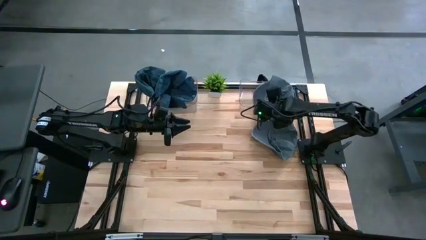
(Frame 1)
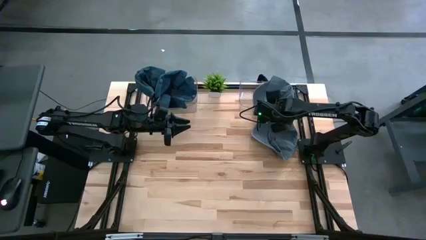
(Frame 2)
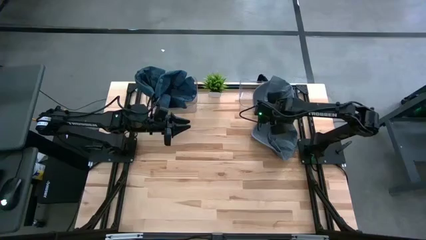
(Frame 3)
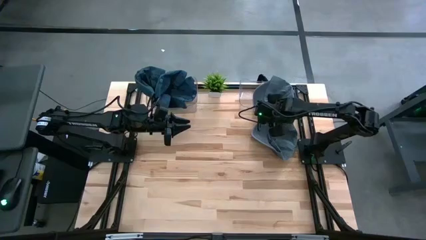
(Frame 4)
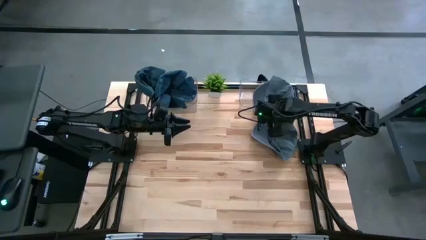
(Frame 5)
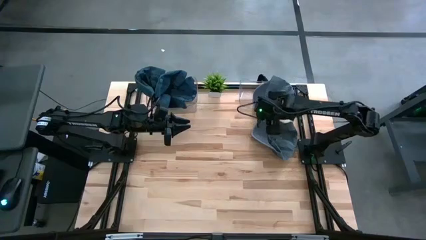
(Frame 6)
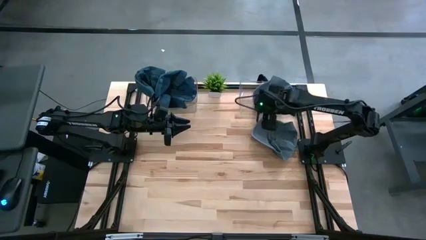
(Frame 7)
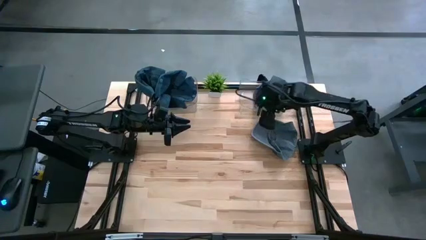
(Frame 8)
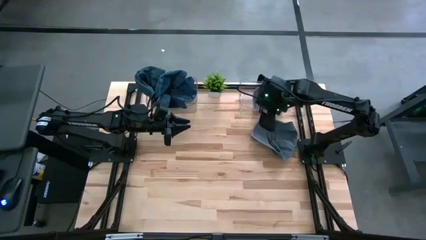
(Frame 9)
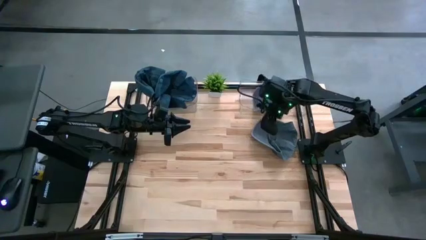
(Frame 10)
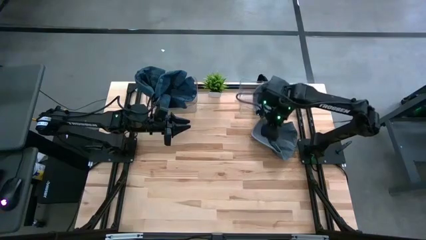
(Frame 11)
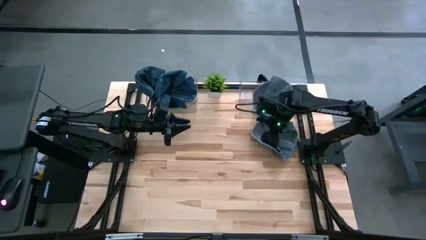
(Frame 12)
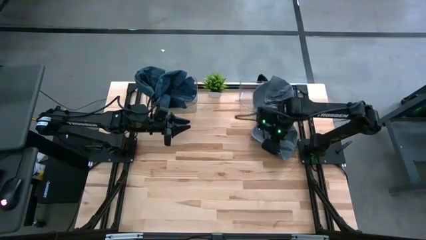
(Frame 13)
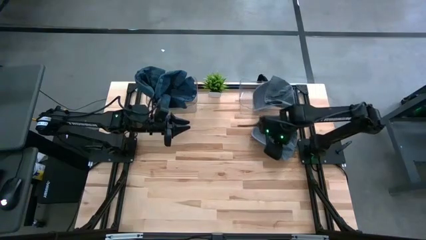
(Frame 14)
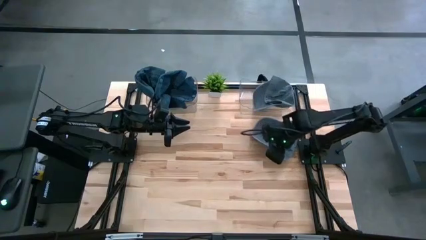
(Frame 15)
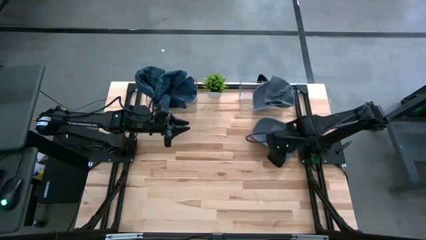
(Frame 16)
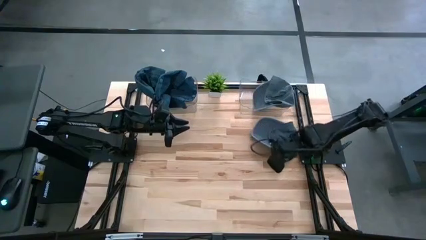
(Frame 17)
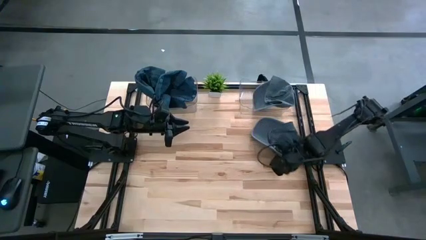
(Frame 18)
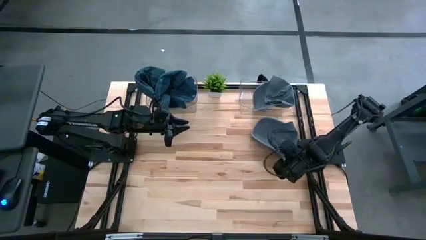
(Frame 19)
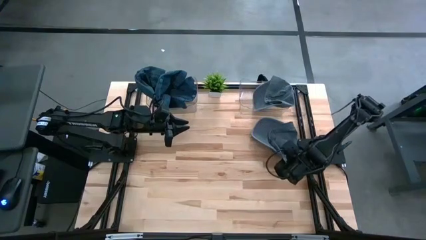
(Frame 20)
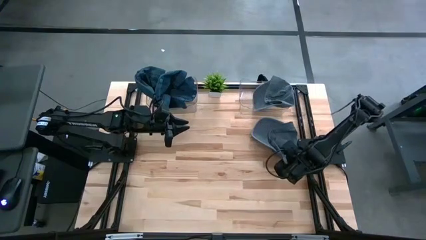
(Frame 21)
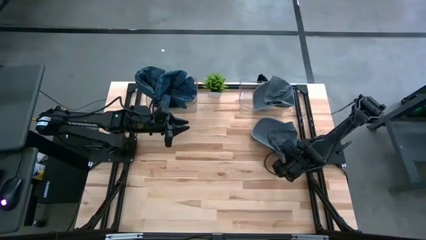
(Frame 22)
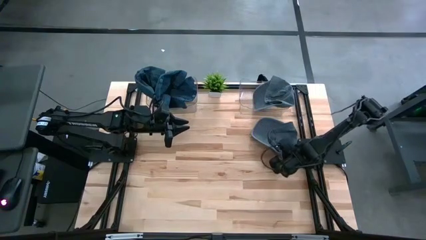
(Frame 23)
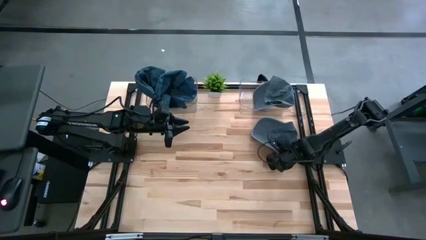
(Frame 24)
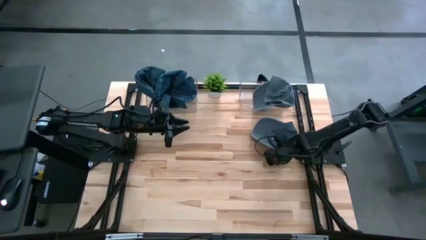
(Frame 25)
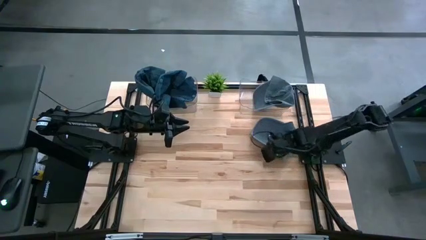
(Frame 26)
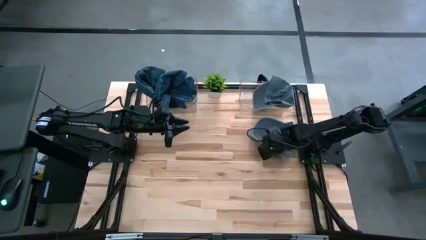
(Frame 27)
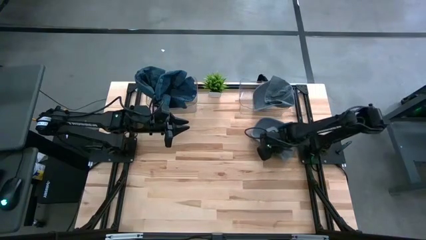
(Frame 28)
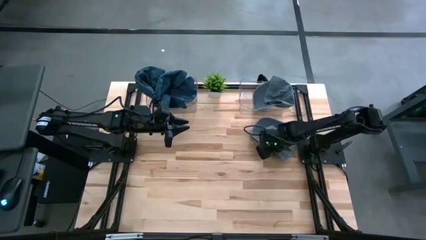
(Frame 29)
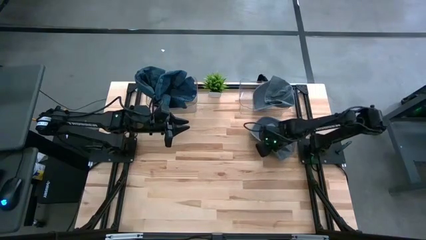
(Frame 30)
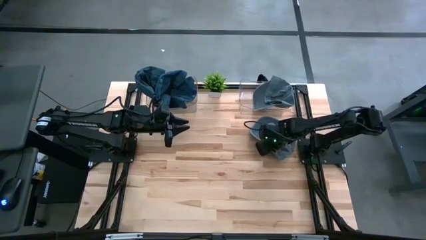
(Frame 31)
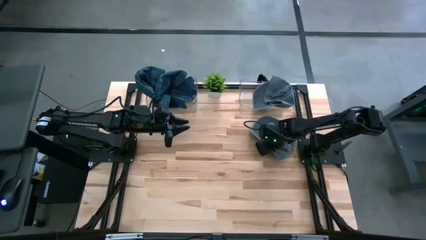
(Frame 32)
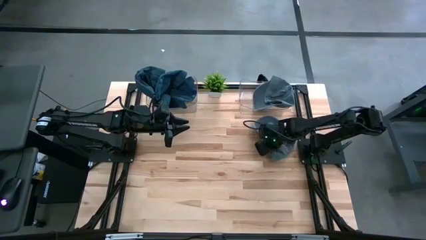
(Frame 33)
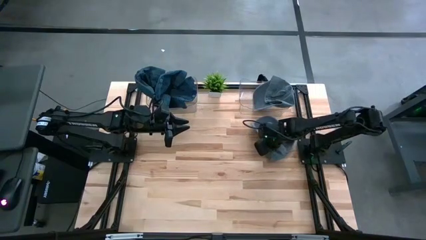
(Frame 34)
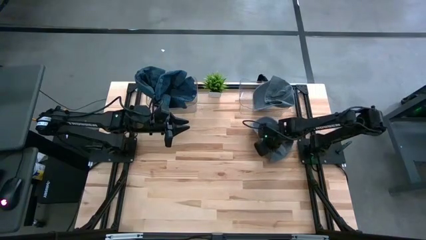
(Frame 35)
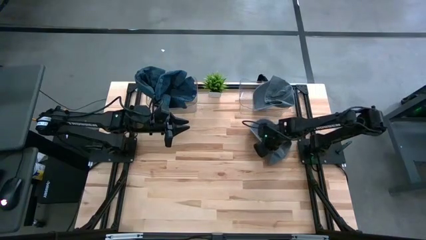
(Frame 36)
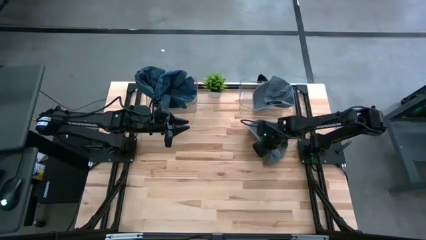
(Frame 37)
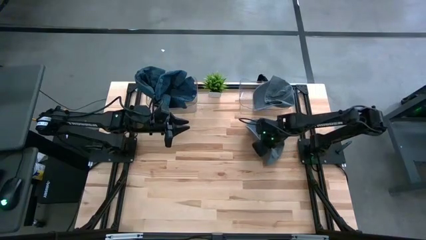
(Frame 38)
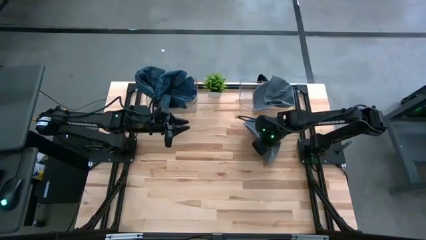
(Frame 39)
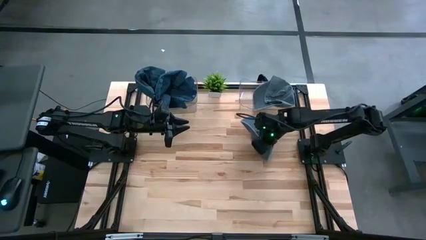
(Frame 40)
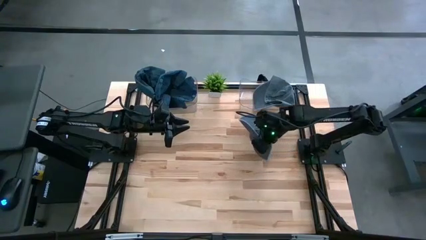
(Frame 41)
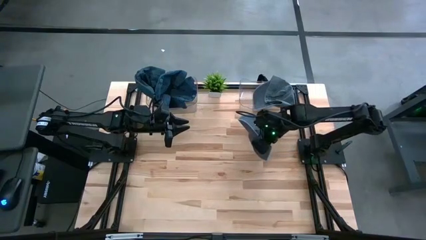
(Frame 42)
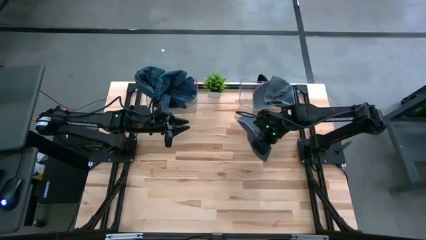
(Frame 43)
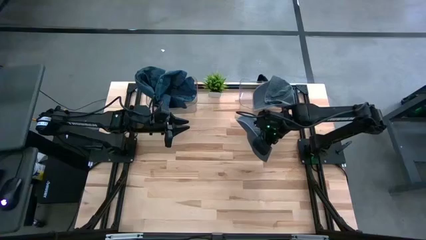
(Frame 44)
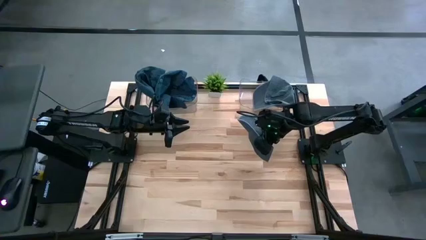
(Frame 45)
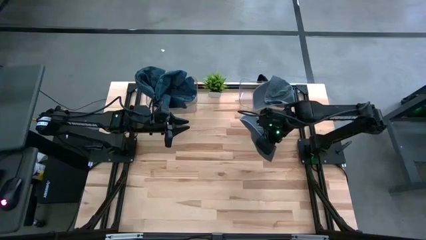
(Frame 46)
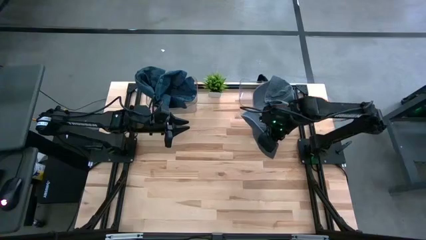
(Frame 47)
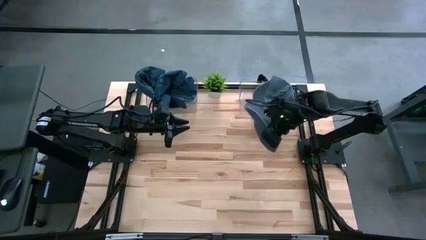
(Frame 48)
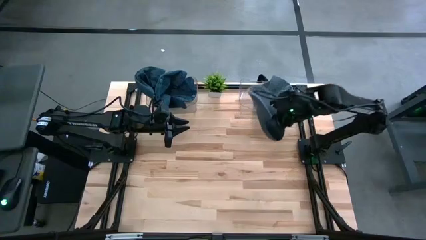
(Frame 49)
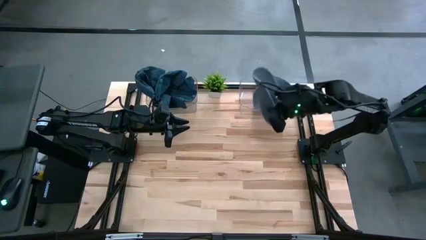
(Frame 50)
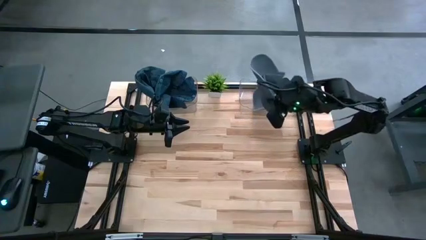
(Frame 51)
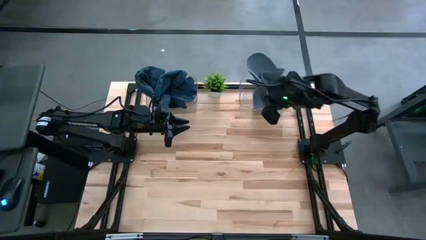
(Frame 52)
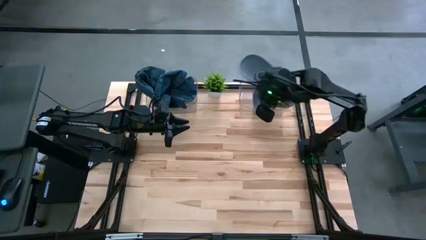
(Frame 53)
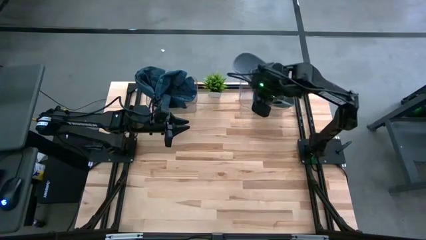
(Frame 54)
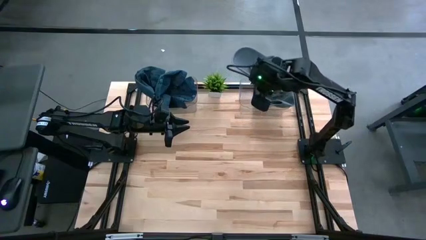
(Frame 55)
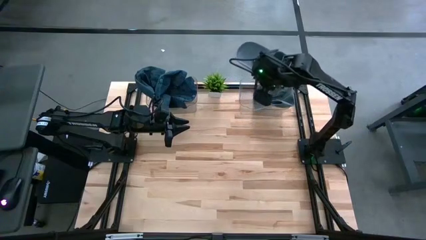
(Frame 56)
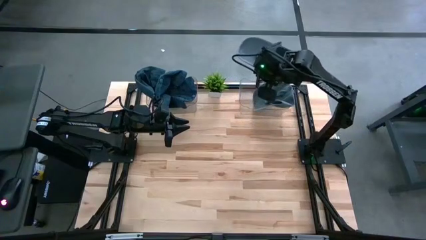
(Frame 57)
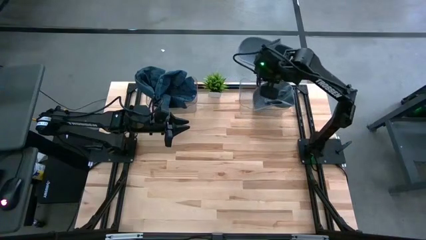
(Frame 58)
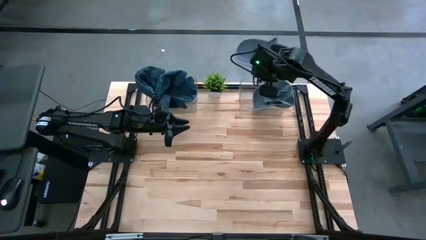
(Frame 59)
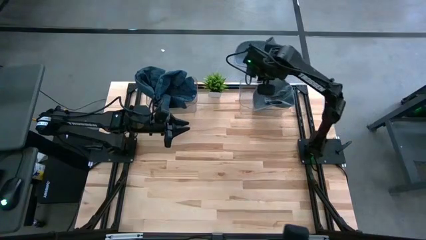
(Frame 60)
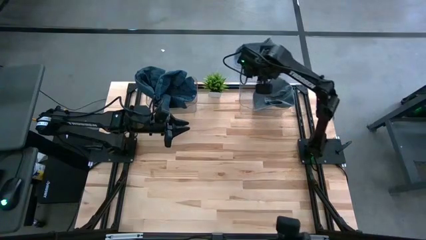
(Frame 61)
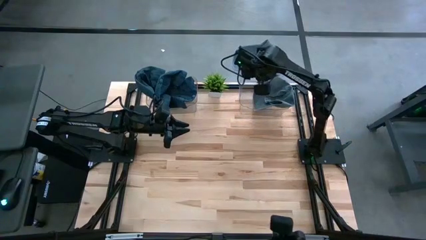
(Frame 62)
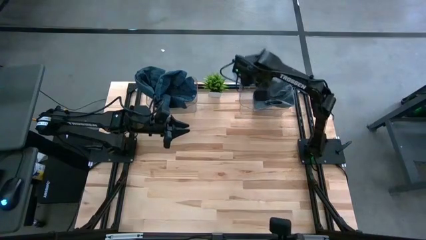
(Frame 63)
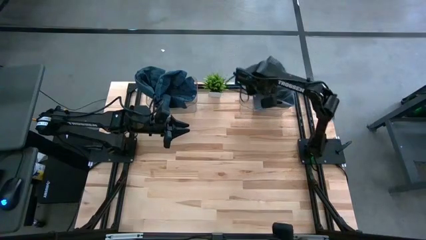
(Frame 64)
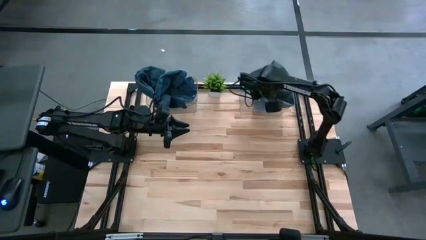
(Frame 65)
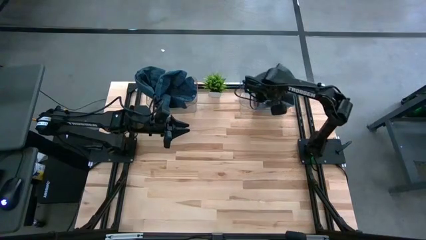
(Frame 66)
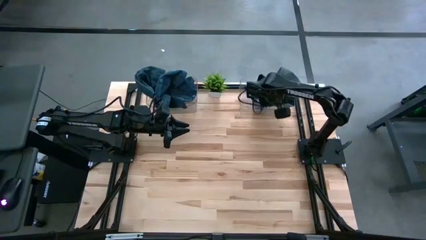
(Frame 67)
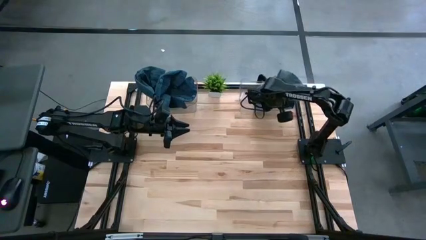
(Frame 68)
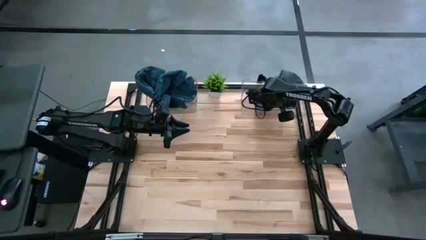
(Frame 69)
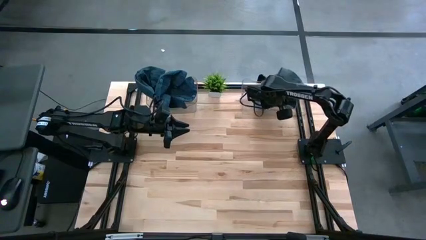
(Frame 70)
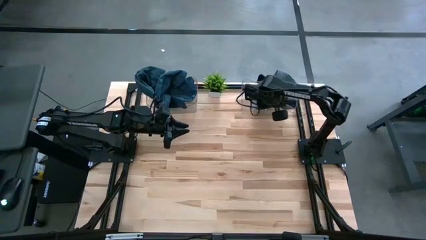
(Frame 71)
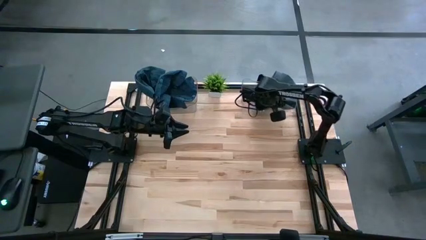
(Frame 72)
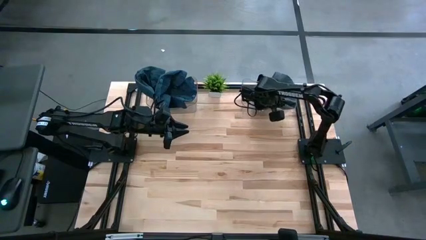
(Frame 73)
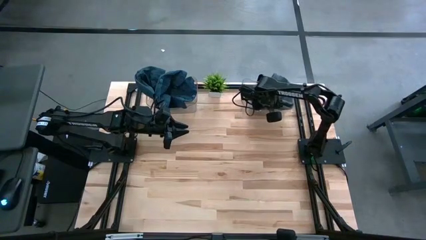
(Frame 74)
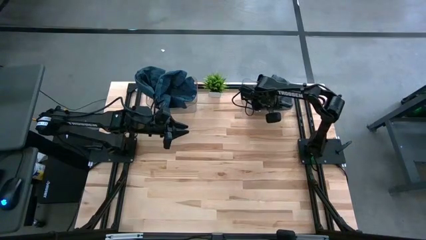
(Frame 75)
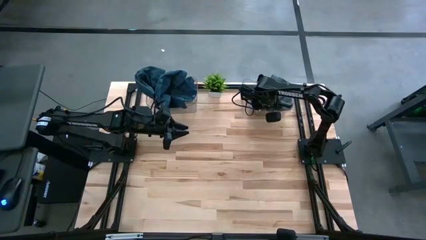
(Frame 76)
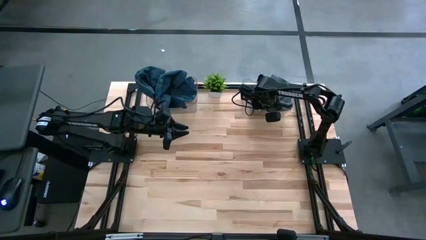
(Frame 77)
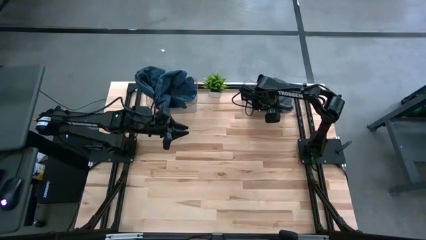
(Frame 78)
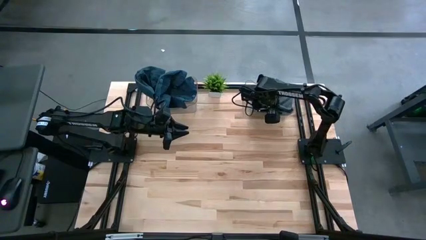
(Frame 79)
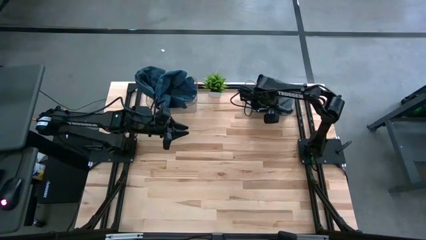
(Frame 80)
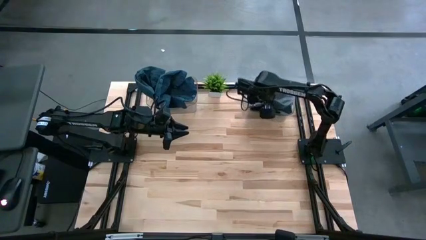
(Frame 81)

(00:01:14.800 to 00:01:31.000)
Task: Pick & Place hat
Put the gray cap into the right transparent bin

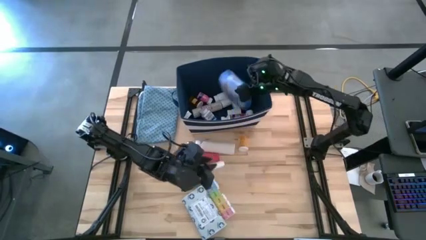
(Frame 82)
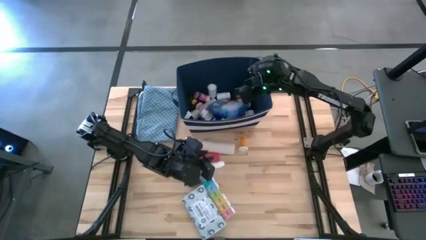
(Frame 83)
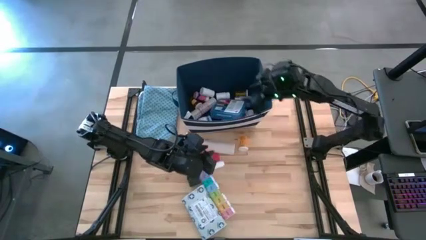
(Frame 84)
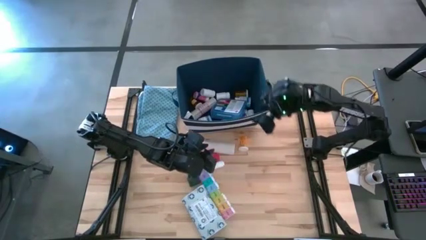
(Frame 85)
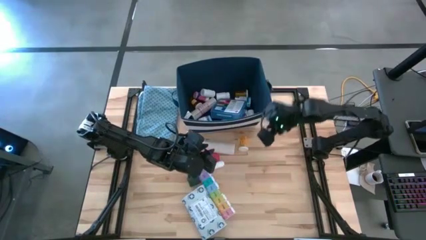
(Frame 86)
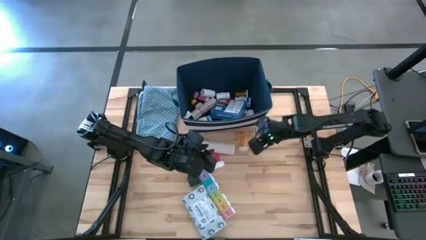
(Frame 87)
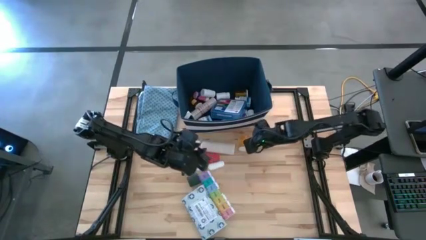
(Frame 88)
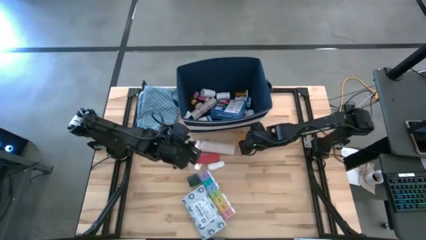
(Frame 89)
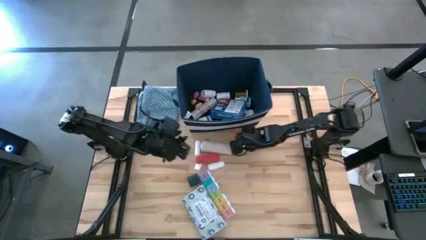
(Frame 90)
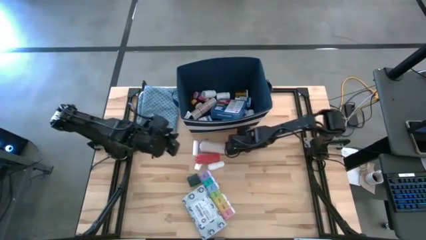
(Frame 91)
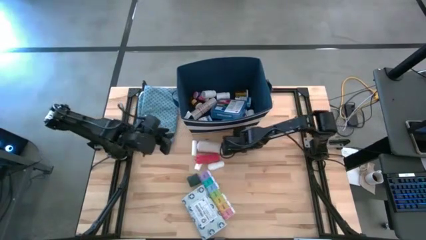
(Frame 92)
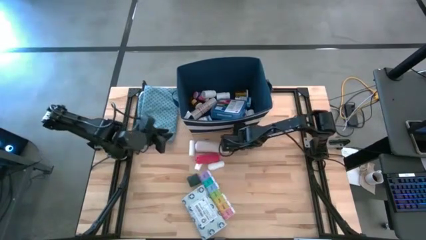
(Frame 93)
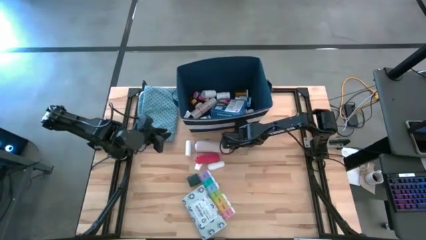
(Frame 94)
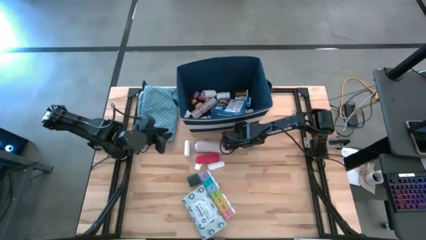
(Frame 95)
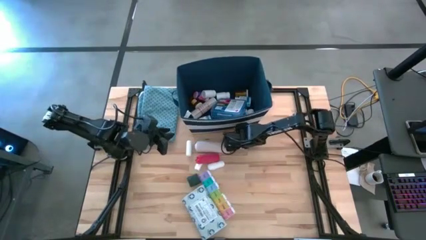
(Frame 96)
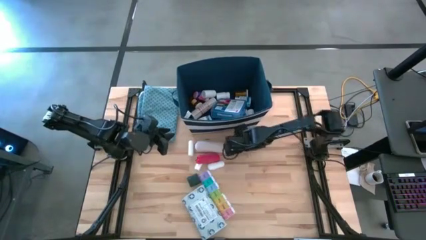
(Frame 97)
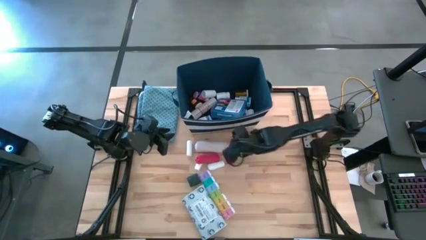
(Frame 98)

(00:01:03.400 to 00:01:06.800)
Task: Pick & place medical supplies in basket/bin
Put the orange pill bottle into the blue bin
